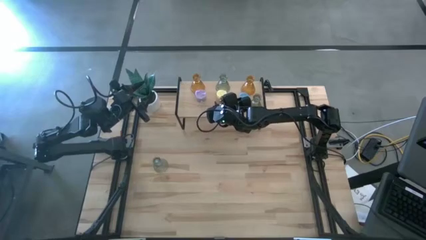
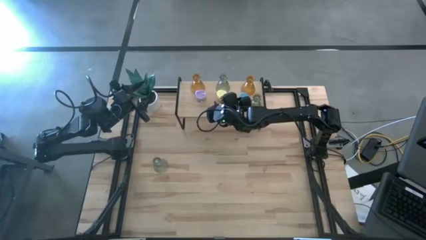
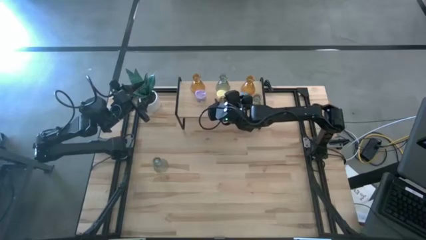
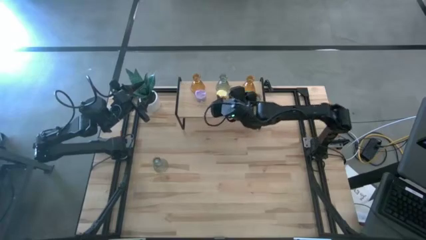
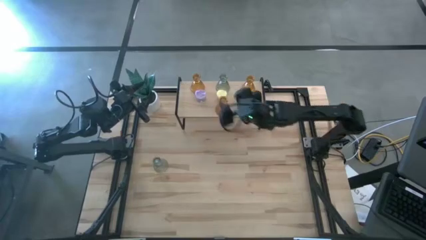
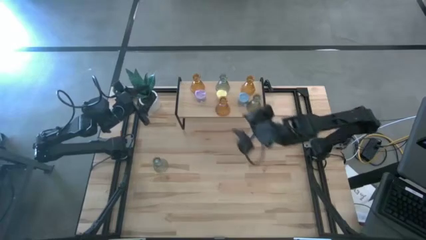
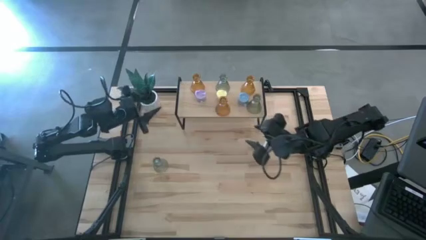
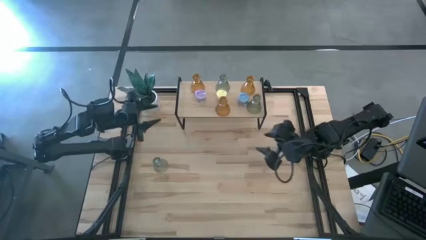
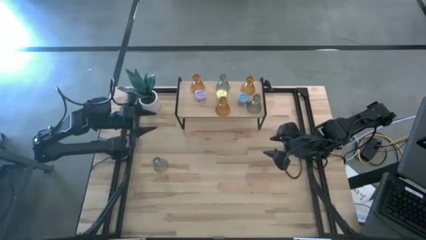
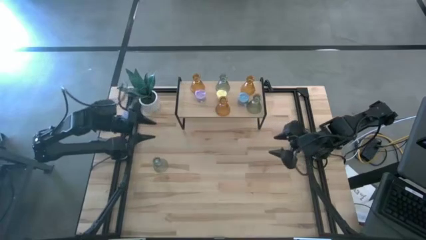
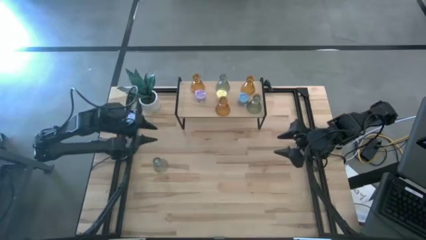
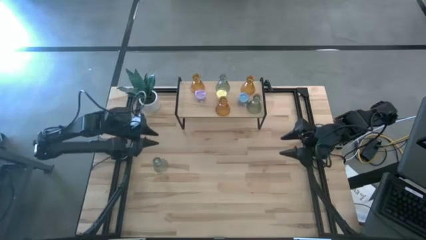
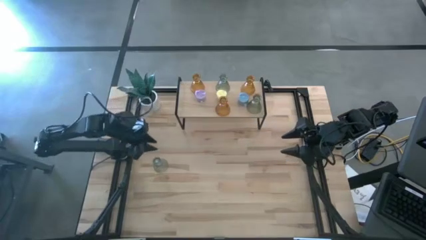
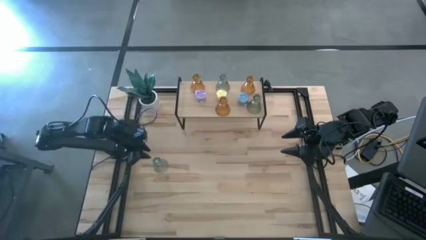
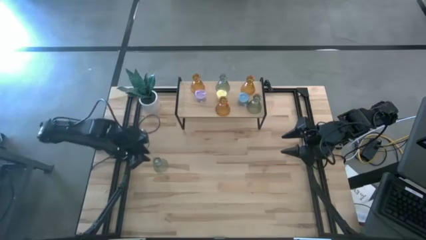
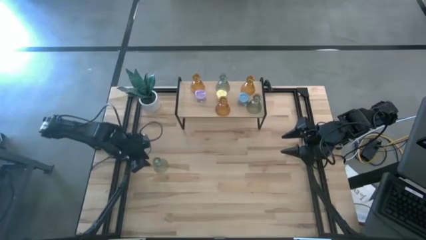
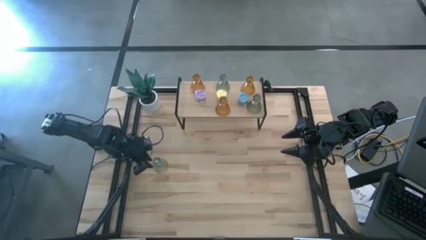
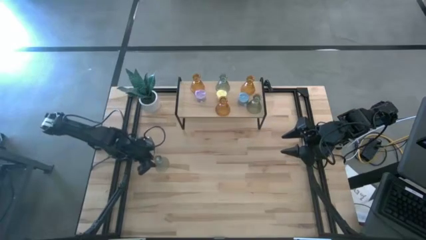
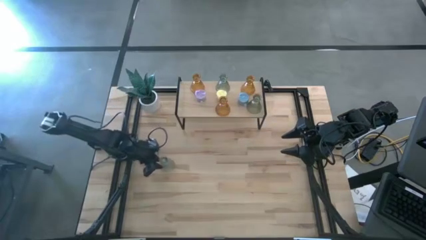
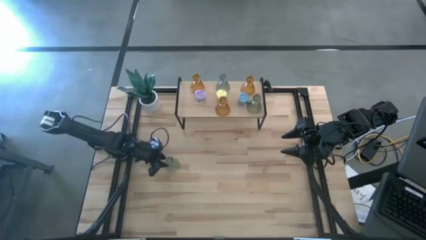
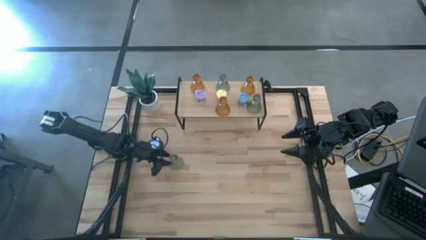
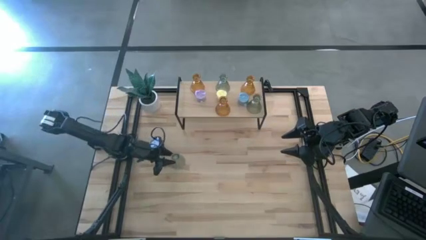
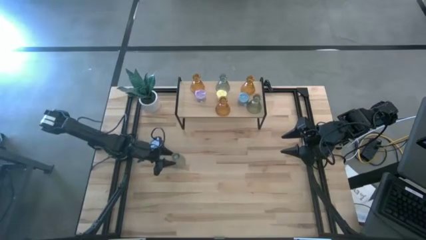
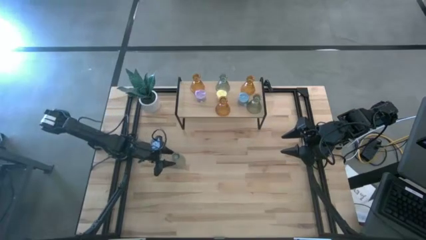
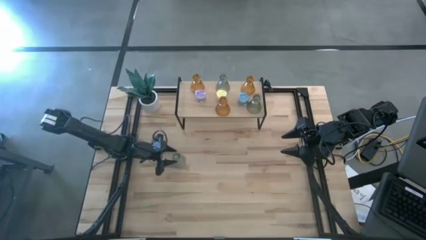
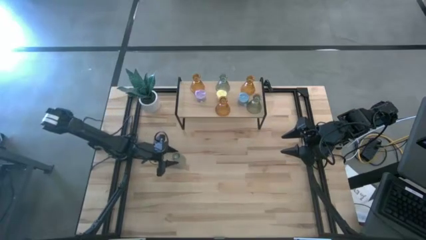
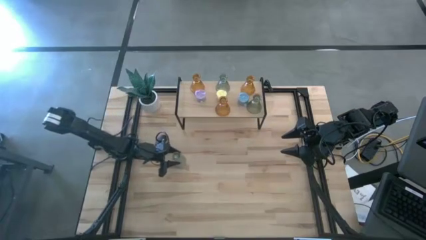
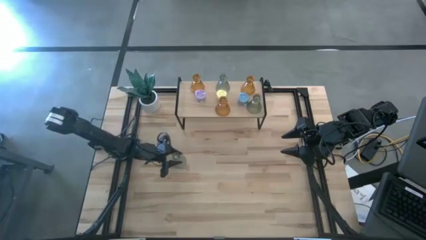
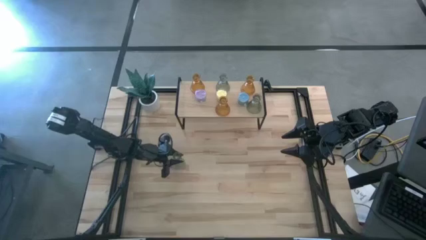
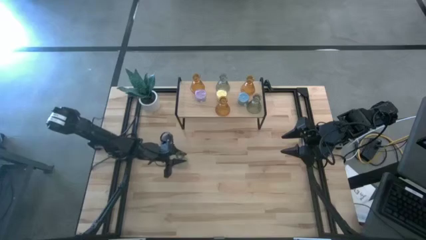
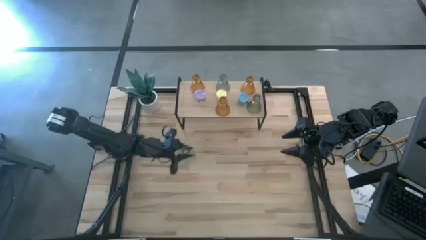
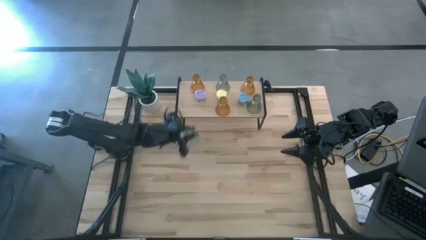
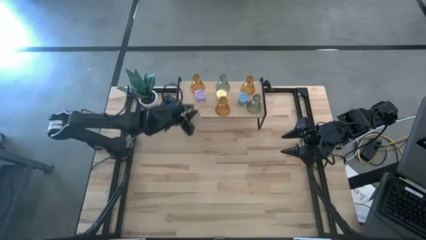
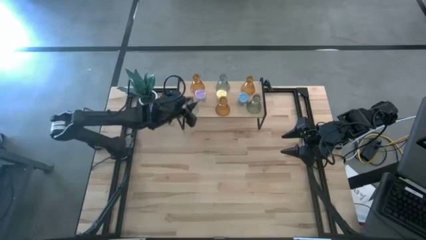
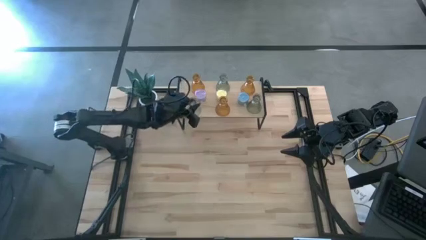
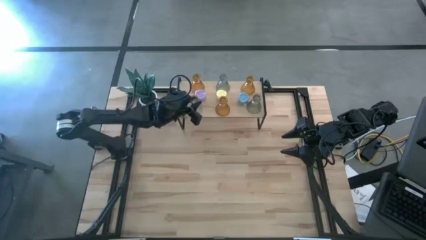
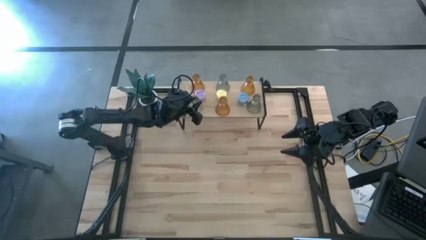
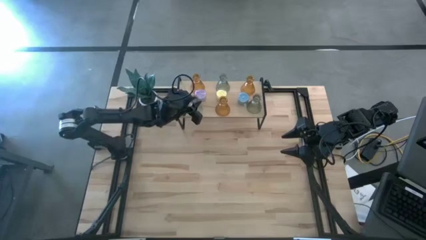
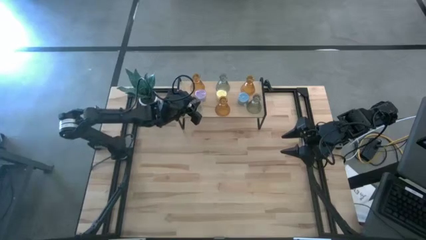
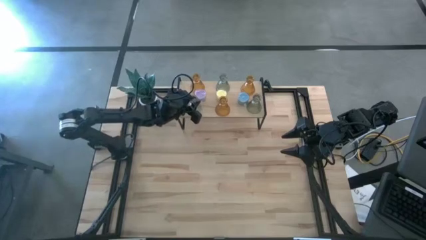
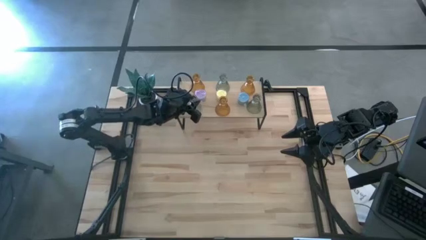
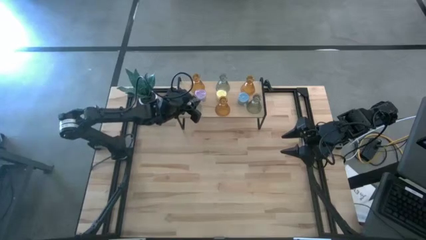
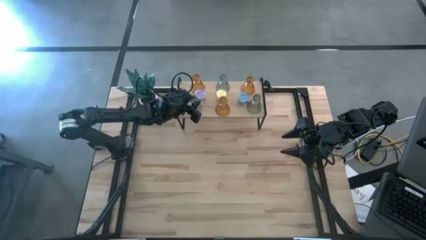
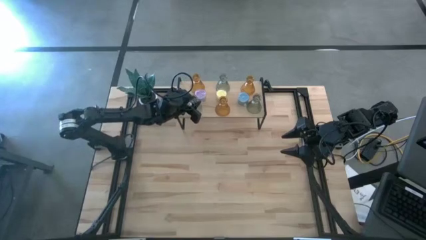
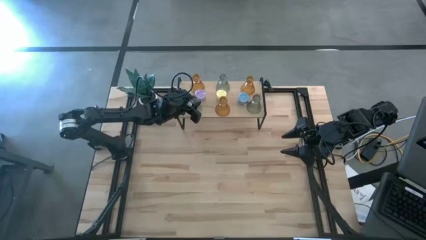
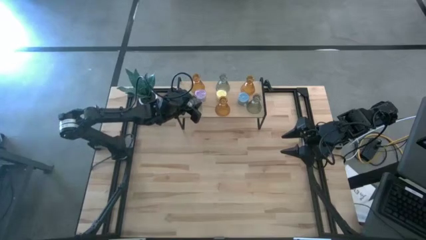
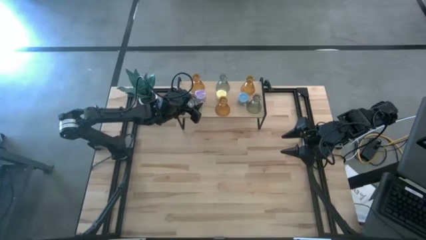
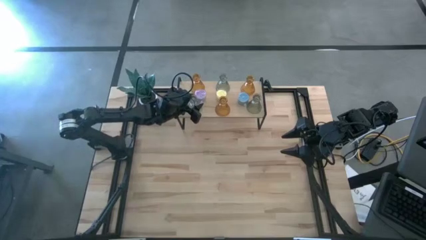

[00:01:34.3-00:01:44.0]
Task: Pick & Place candle stick holders
Put the green glass candle holder on the shelf

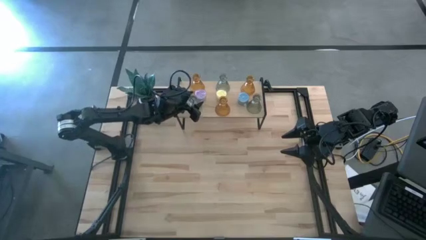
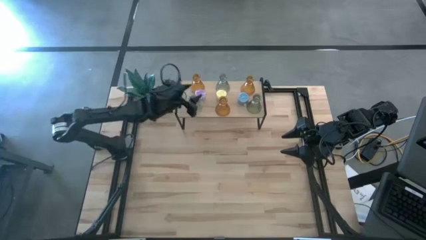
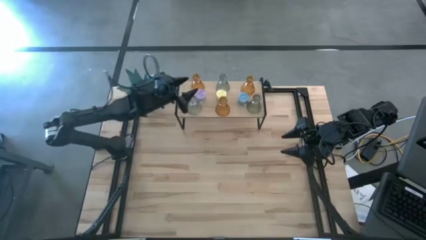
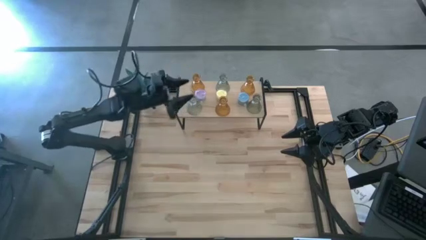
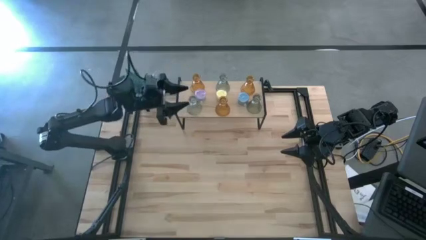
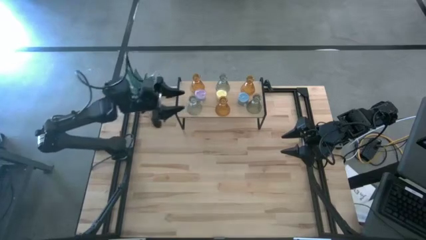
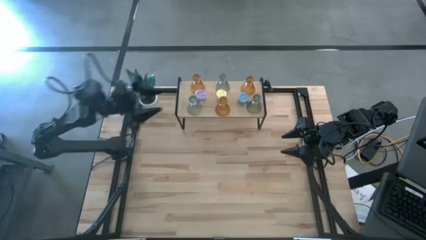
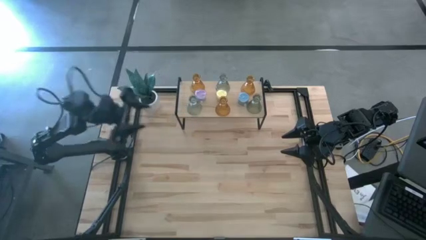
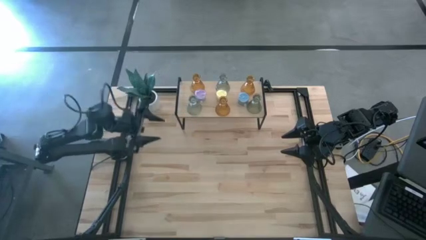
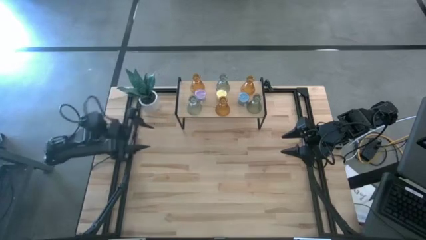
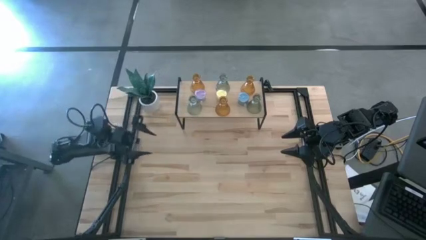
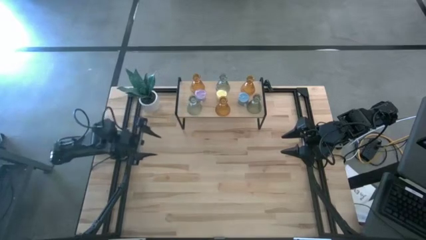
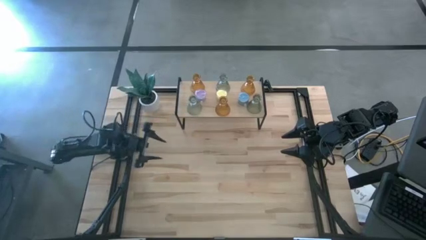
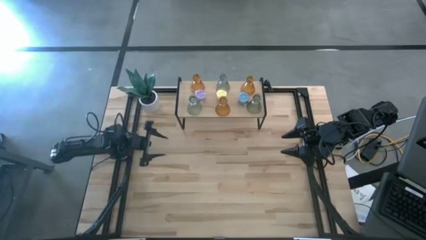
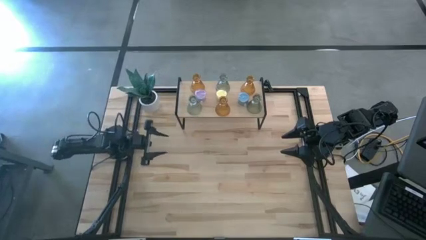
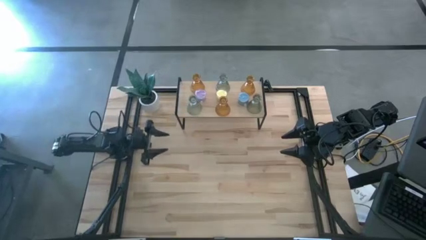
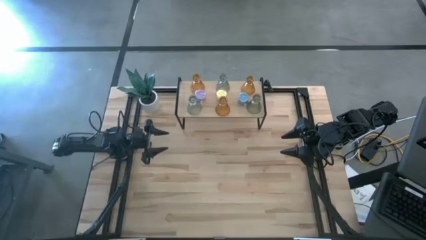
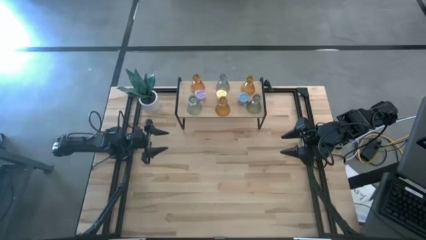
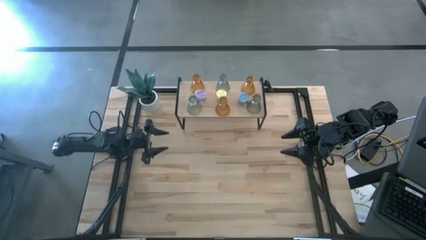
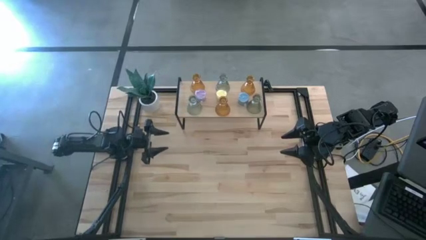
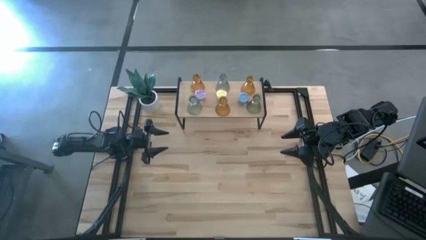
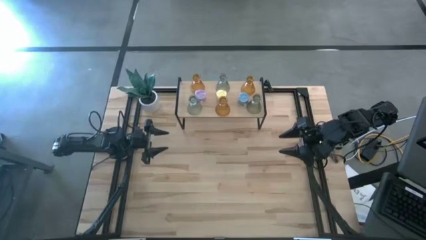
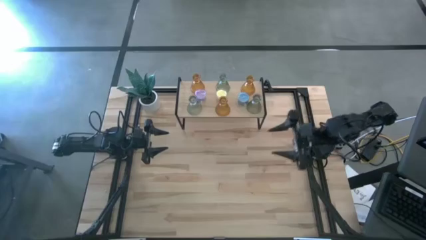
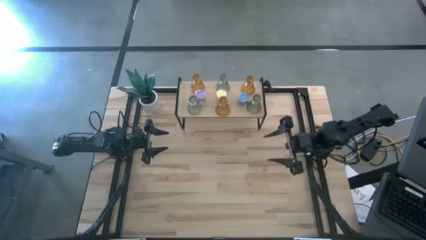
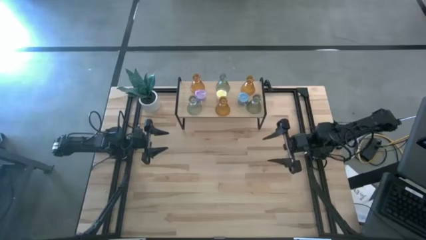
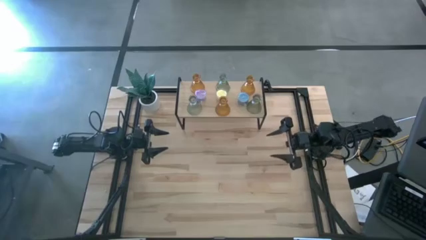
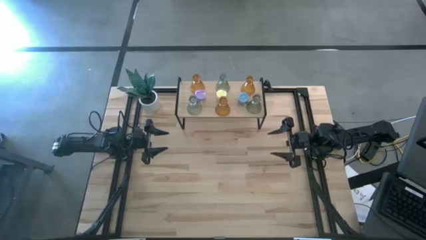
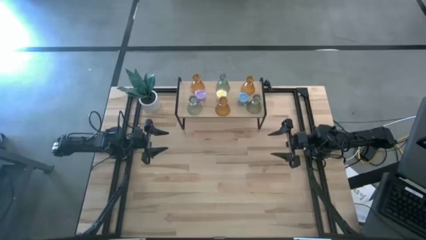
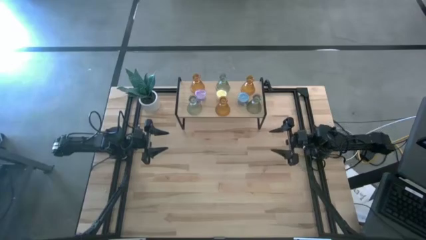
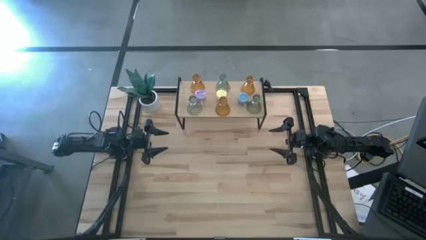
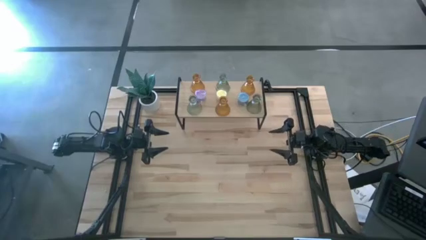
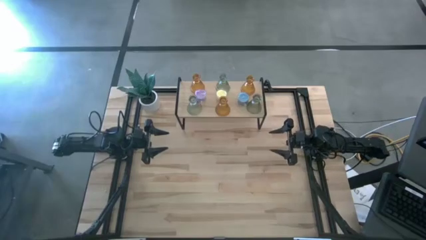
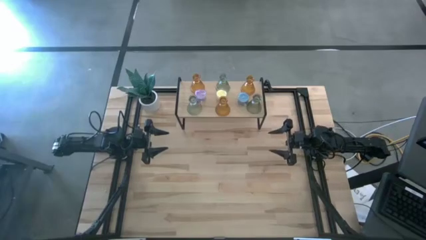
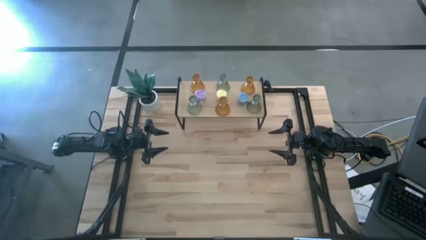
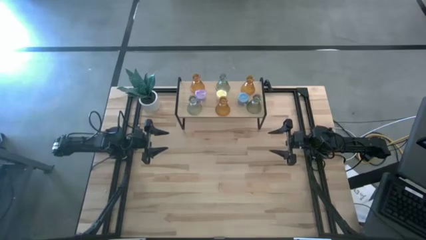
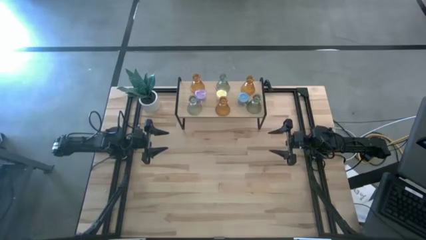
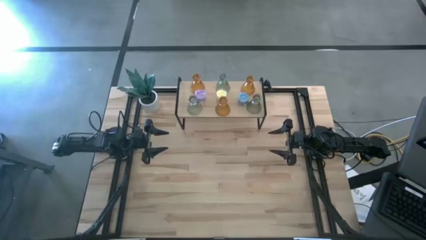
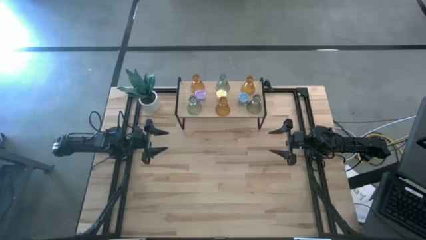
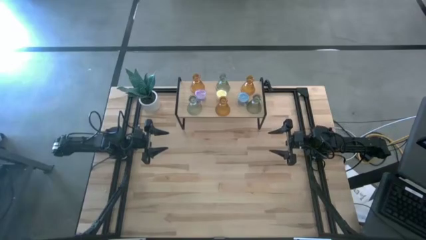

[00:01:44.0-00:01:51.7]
Return to Home Position
